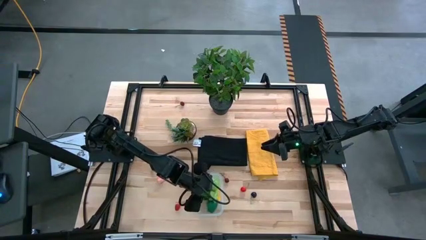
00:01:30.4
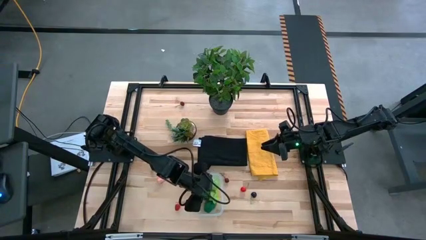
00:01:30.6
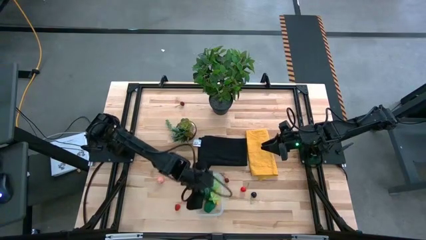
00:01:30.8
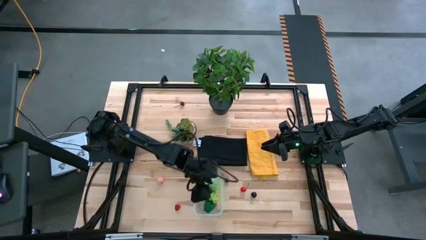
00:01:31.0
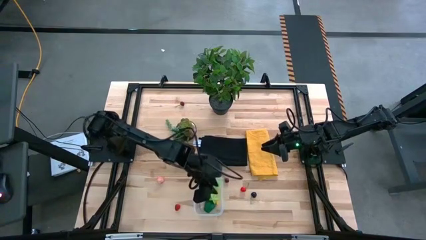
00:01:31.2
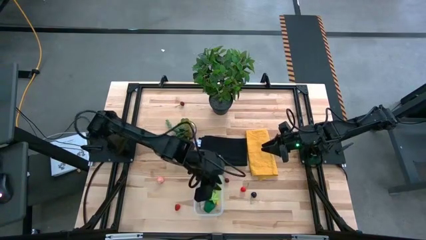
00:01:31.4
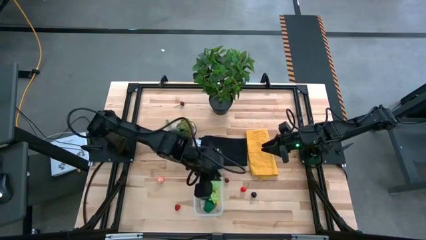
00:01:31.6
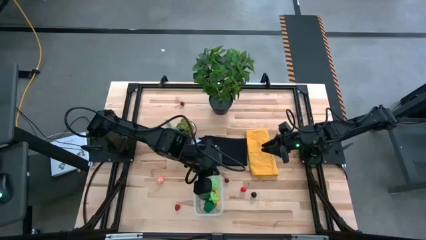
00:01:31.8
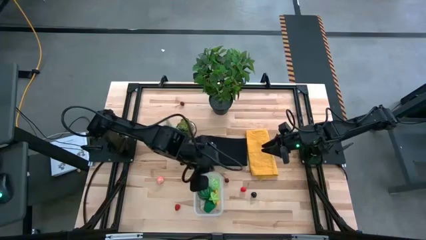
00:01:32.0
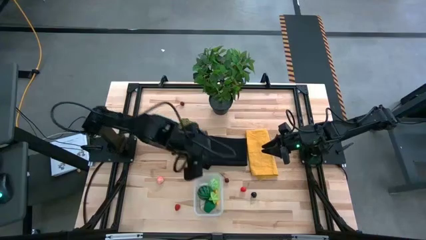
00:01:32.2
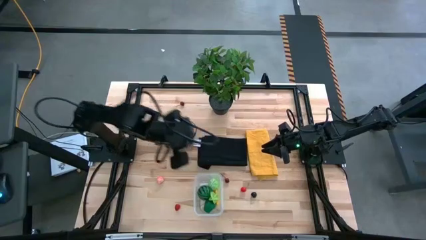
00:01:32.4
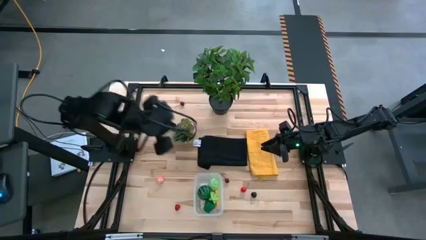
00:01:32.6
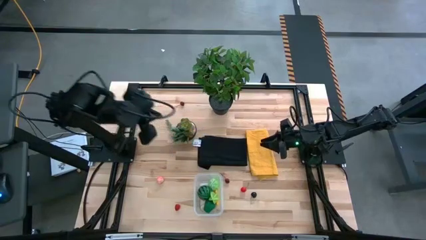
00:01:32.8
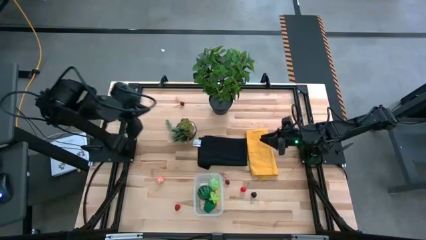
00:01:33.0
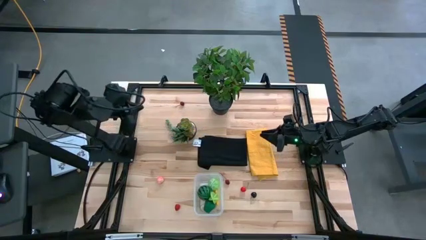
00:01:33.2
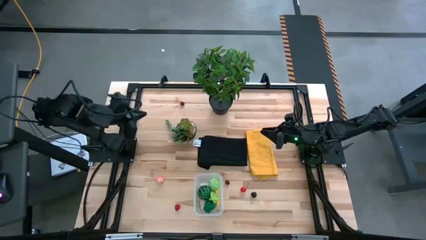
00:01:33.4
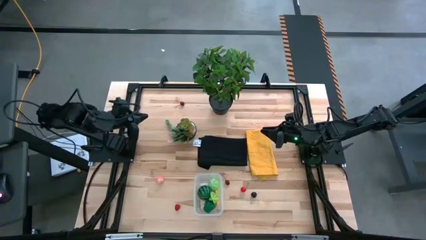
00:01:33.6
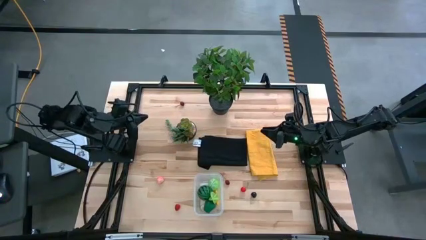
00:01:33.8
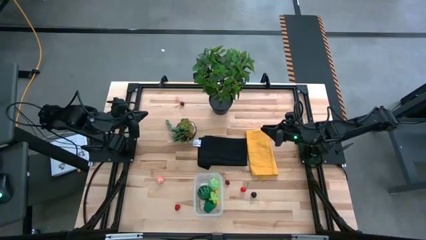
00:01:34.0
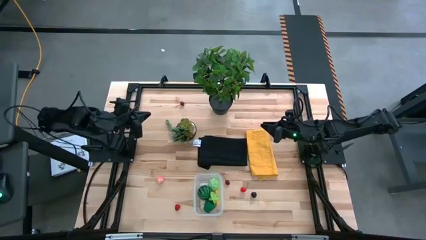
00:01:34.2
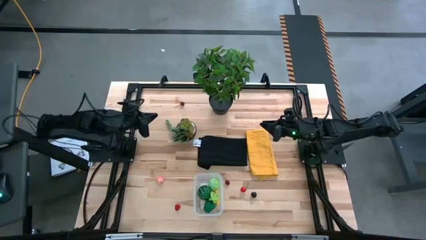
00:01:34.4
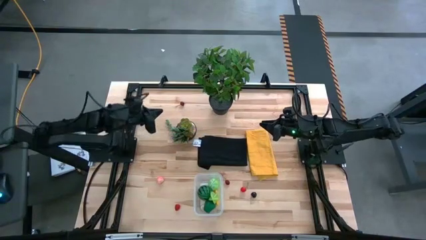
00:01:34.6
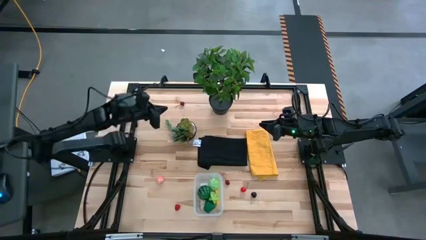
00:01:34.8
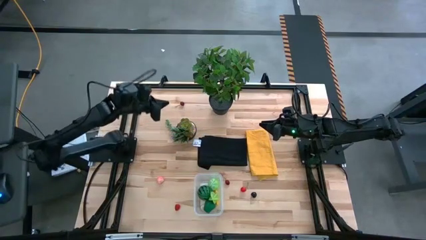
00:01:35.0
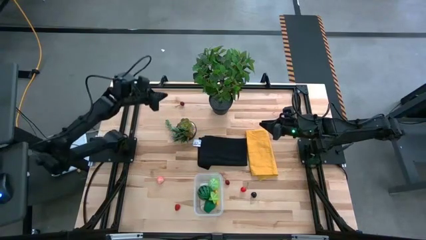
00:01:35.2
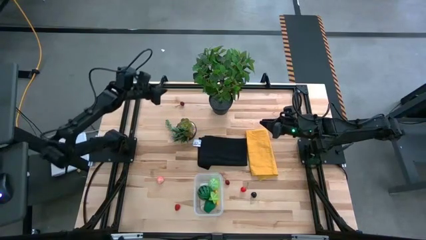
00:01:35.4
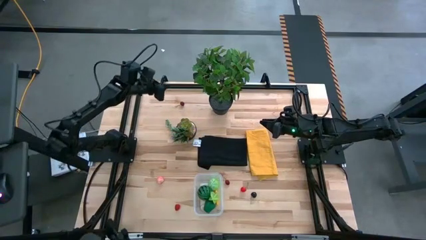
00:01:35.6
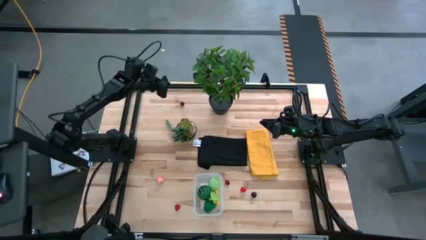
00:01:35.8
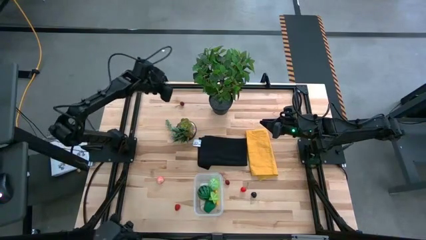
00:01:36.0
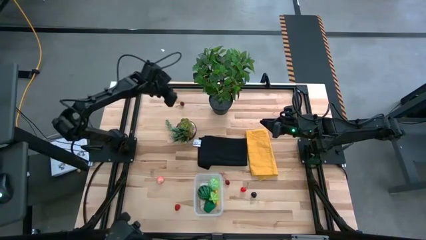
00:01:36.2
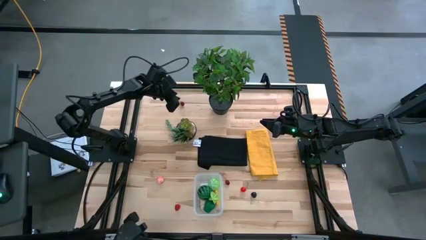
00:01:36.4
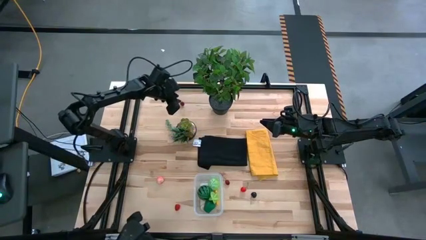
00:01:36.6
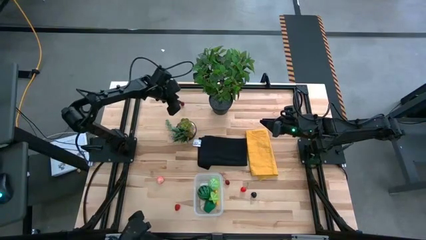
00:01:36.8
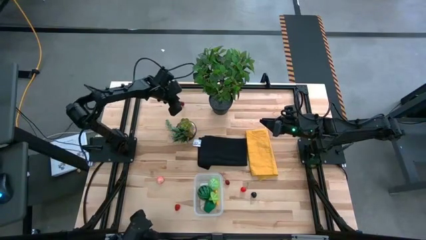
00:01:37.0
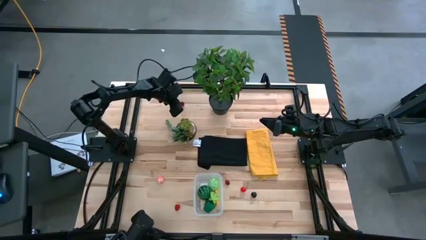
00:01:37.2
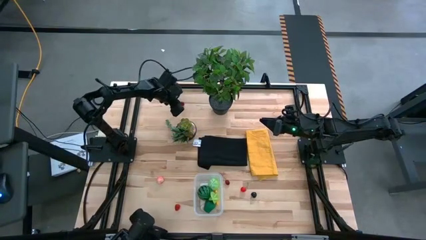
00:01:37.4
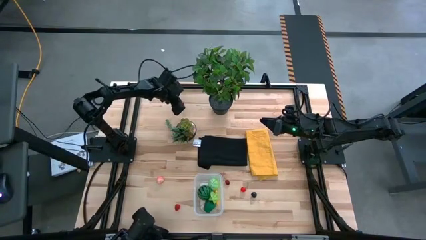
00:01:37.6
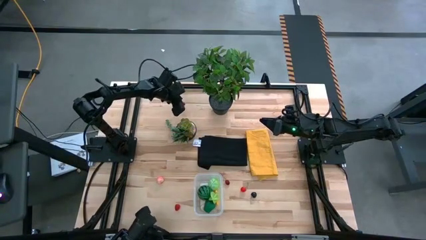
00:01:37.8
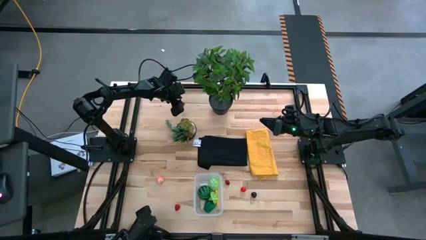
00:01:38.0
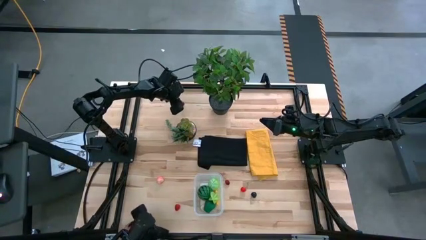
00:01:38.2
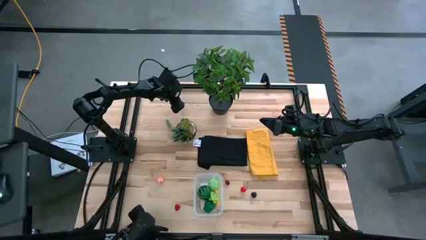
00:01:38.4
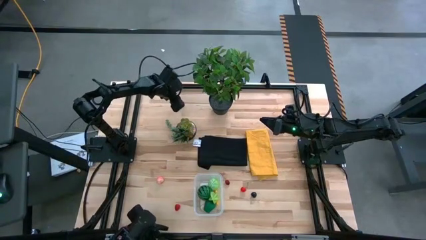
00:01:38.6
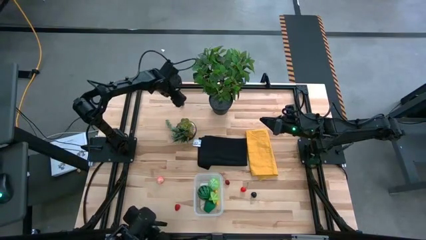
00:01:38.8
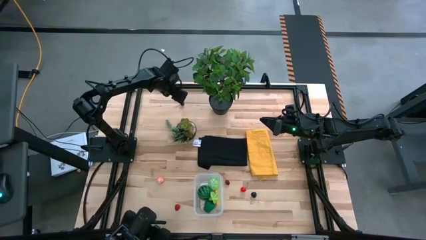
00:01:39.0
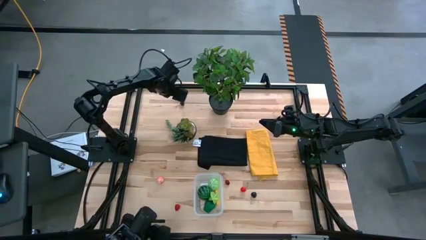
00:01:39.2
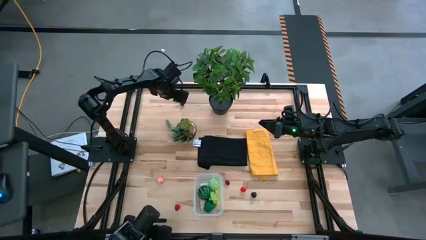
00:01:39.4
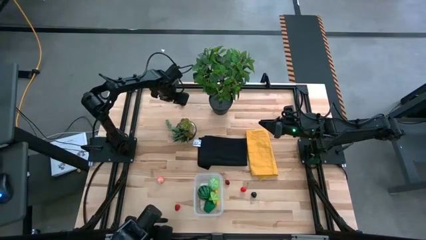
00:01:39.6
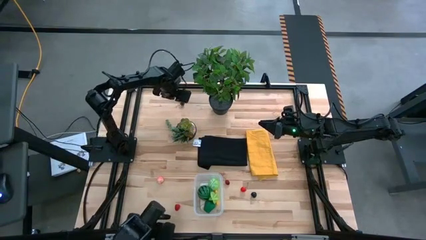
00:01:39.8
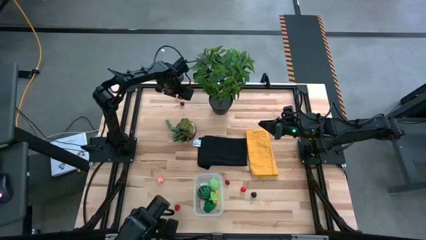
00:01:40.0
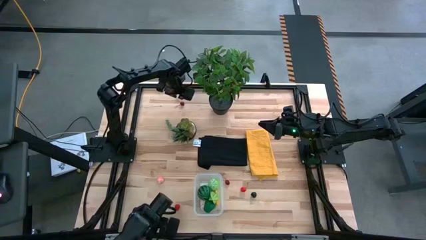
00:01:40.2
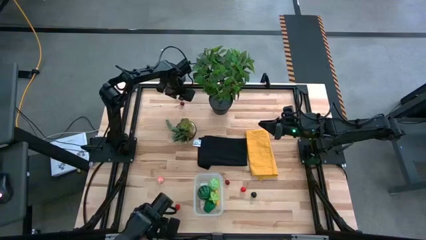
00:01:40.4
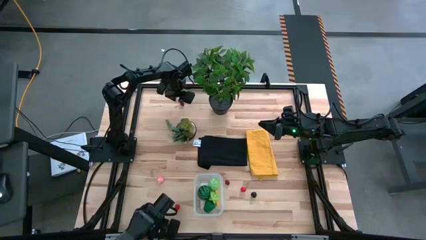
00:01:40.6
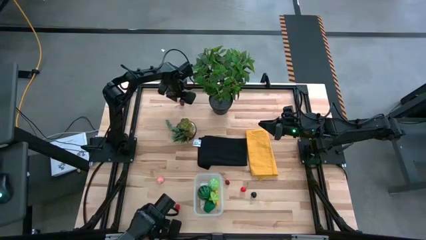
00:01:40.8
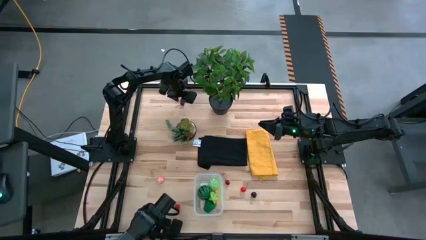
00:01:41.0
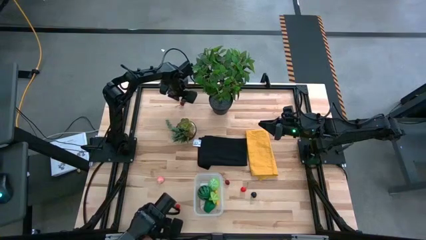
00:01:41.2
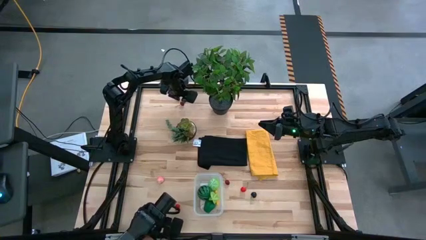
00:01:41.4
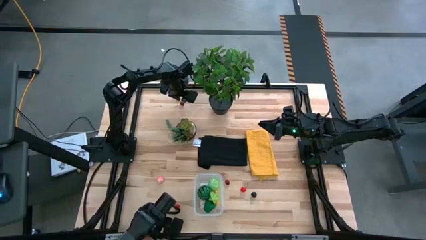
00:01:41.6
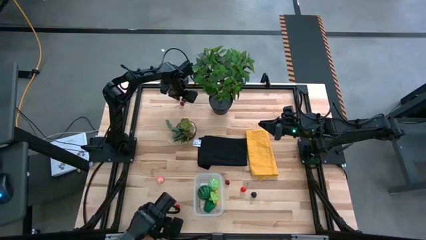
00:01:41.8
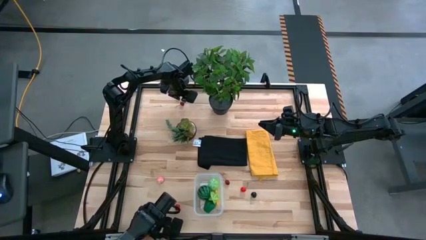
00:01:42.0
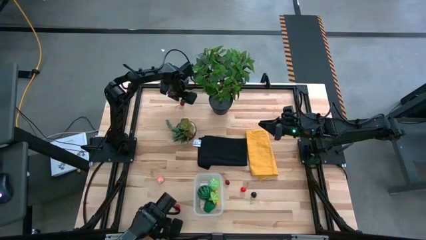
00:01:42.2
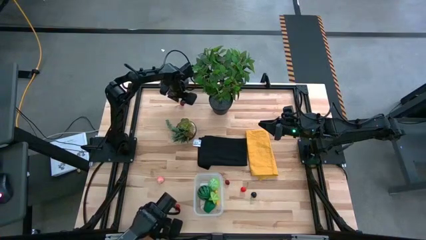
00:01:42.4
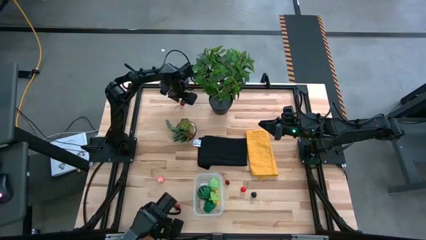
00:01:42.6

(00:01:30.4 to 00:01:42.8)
Task: Pick and placing Produce into tupperware
Put the top red cherry into the bin
